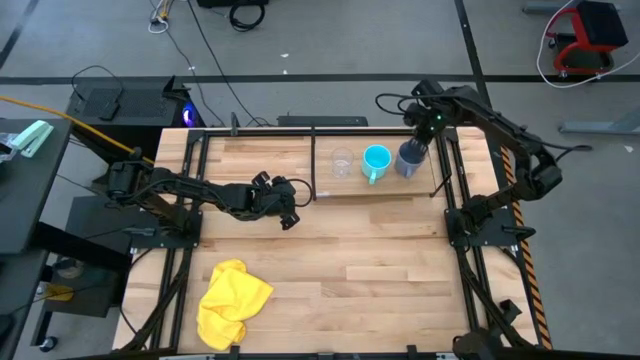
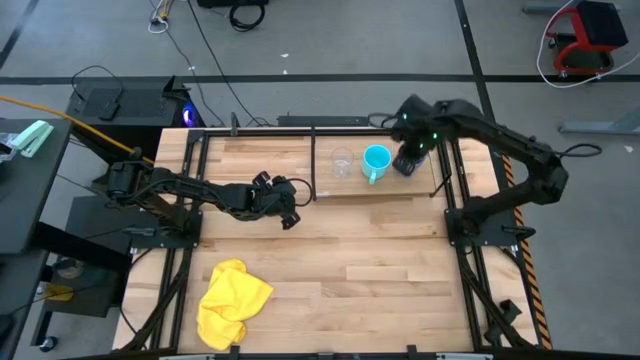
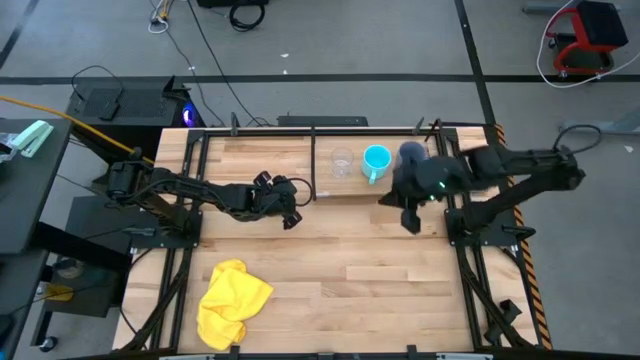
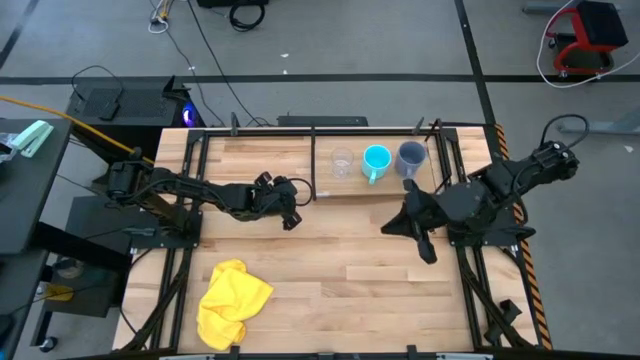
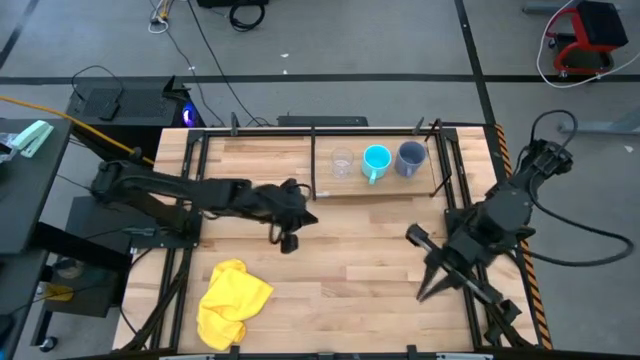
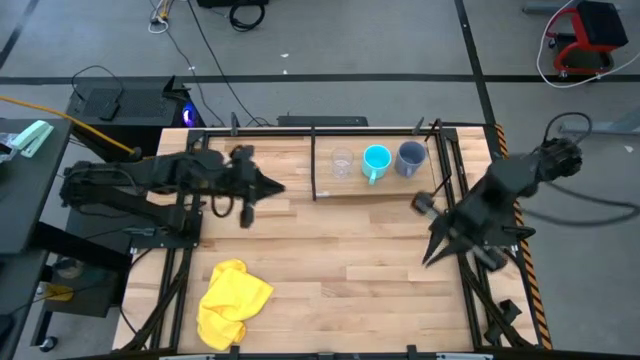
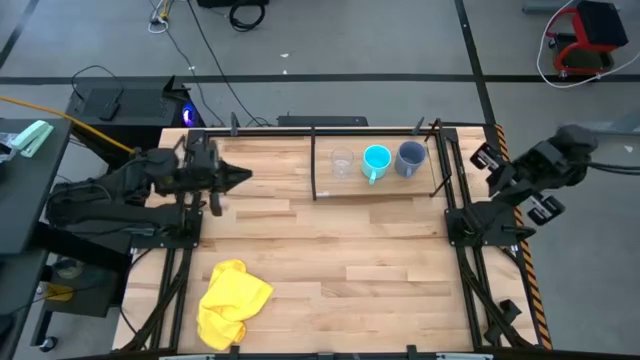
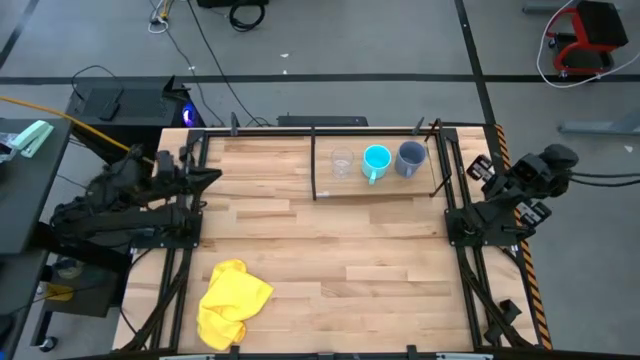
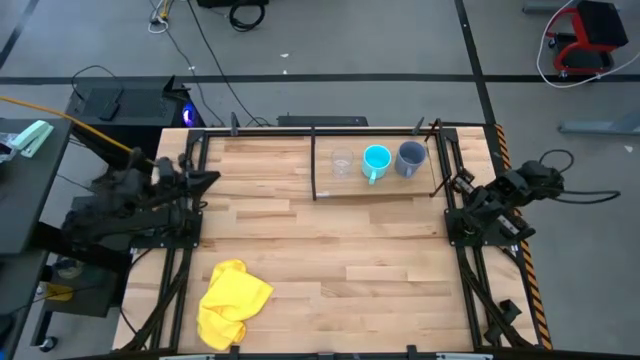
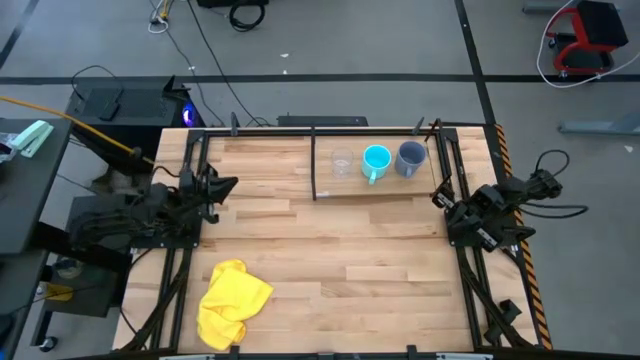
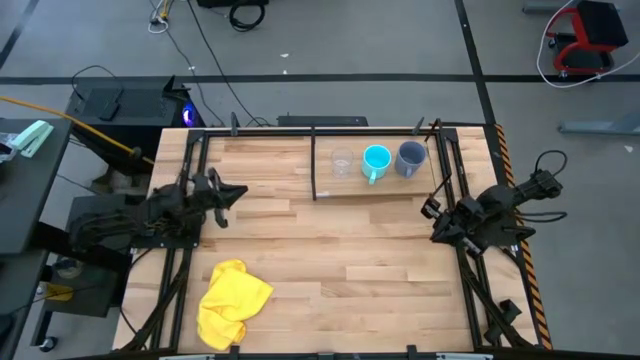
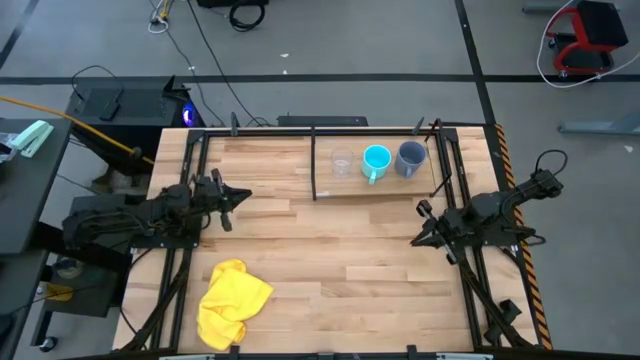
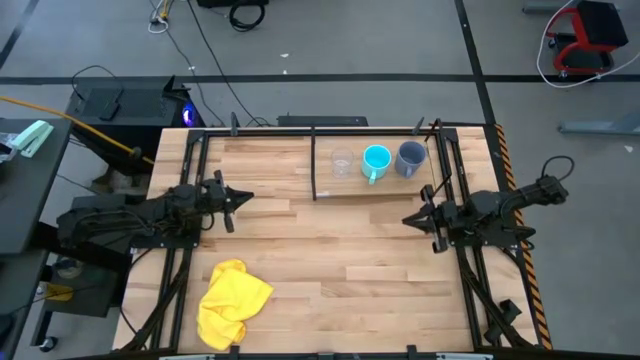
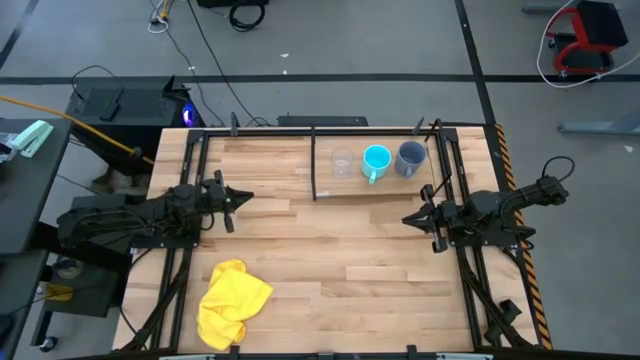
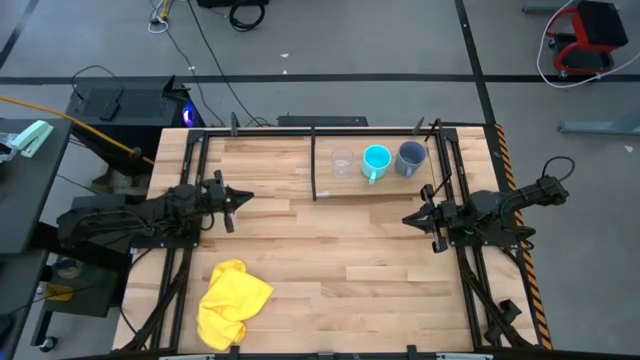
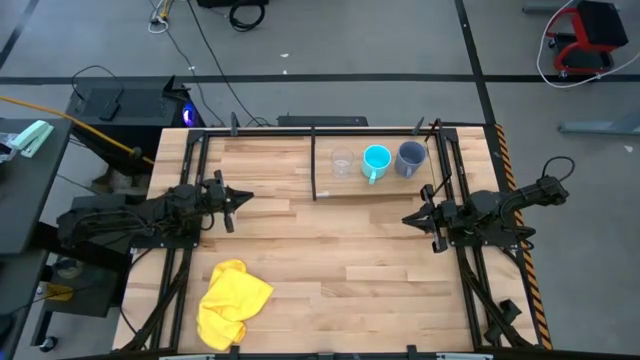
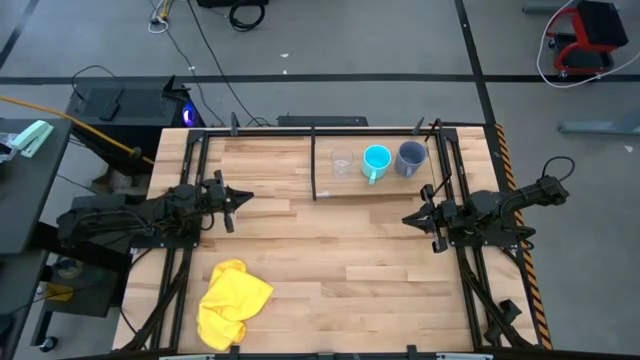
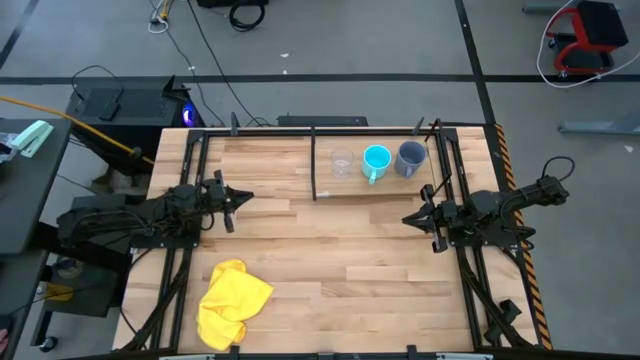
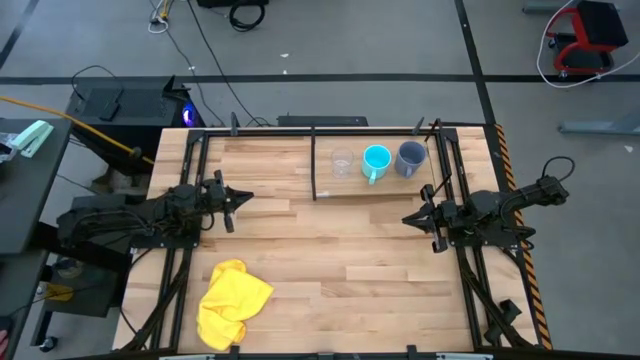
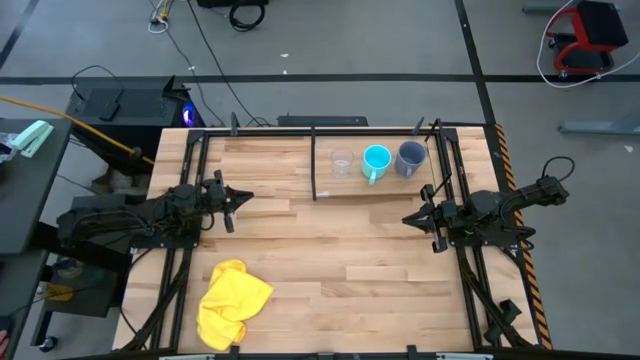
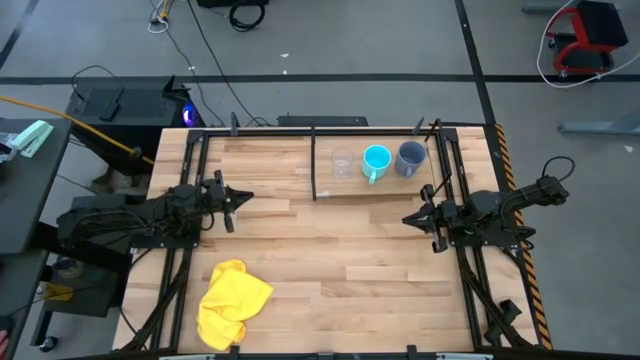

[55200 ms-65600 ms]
Task: Stack small to large cups/mugs on shelf
Return to Home Position

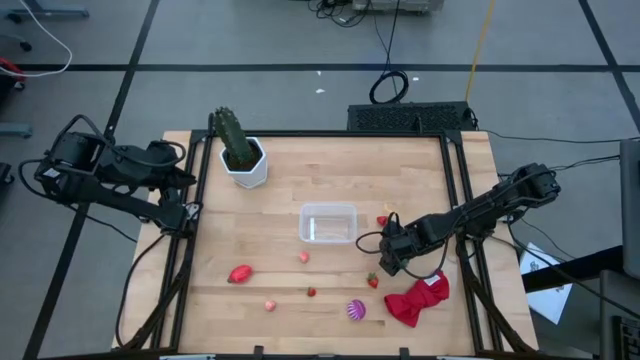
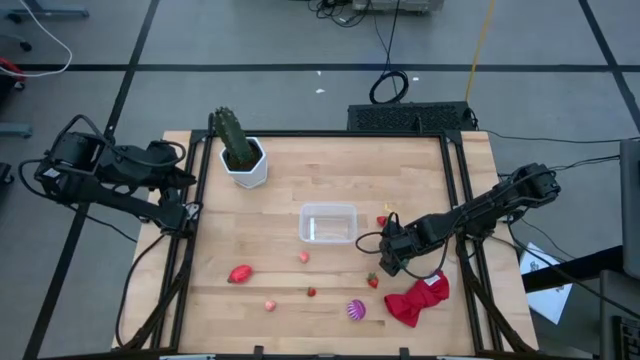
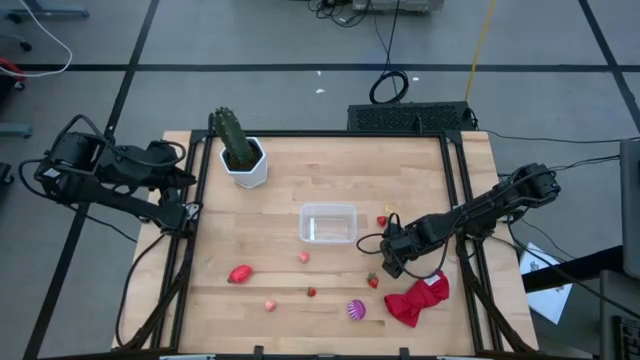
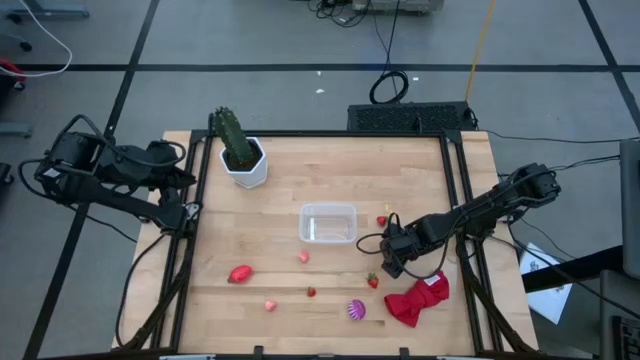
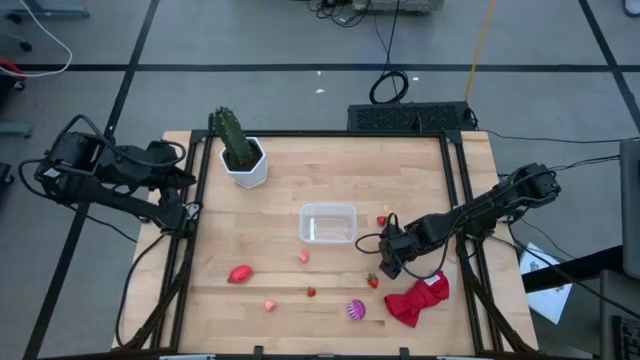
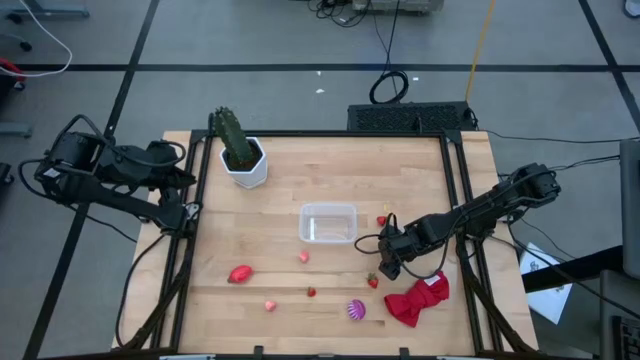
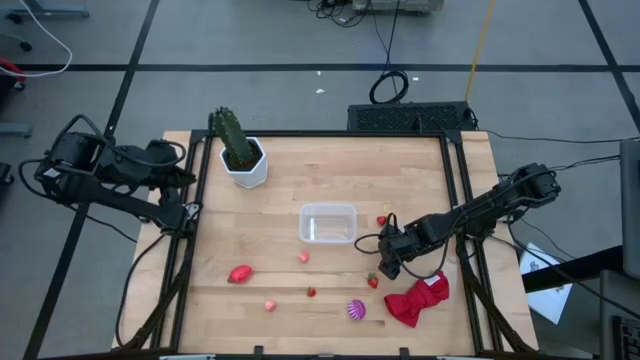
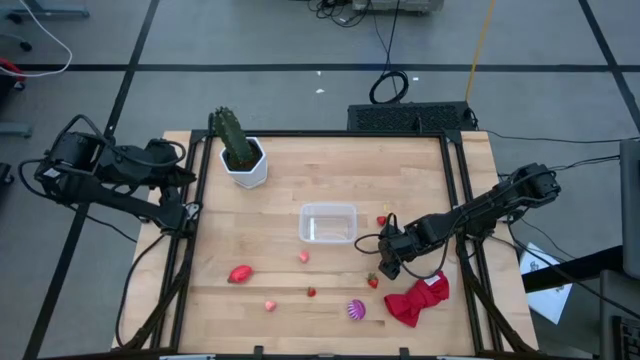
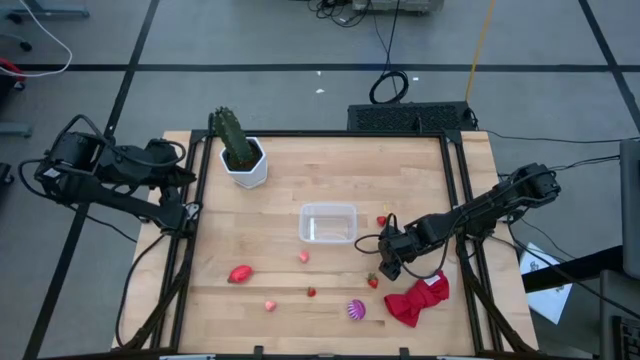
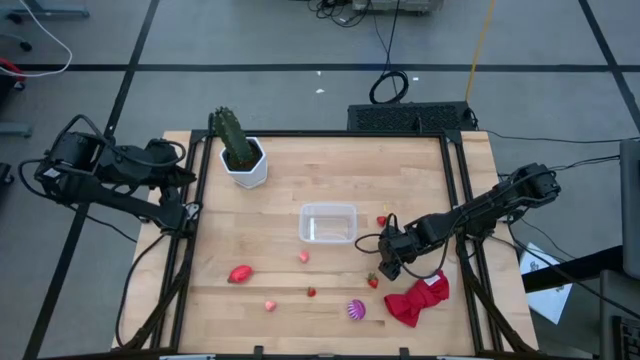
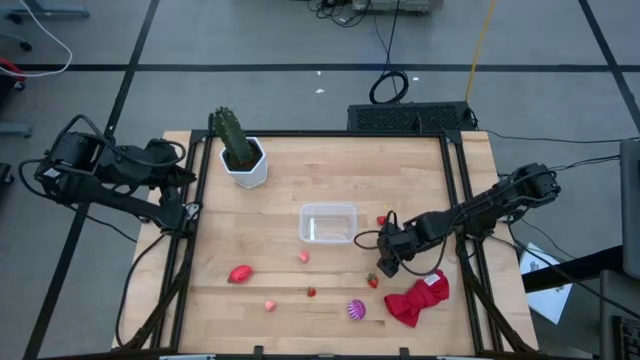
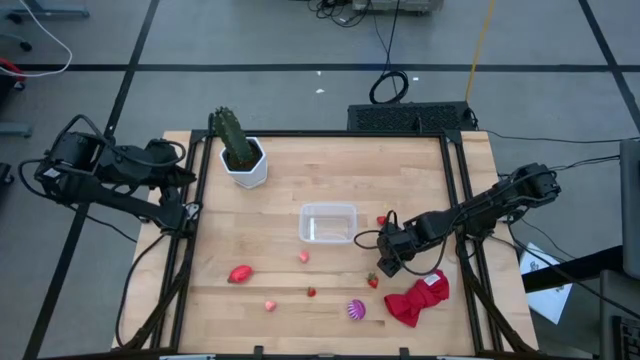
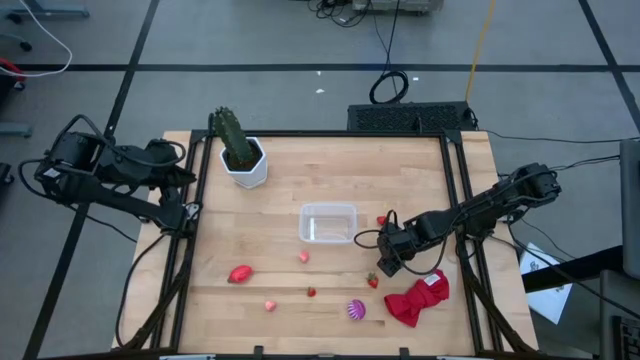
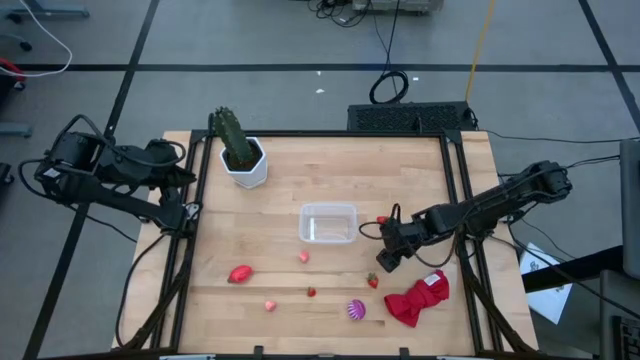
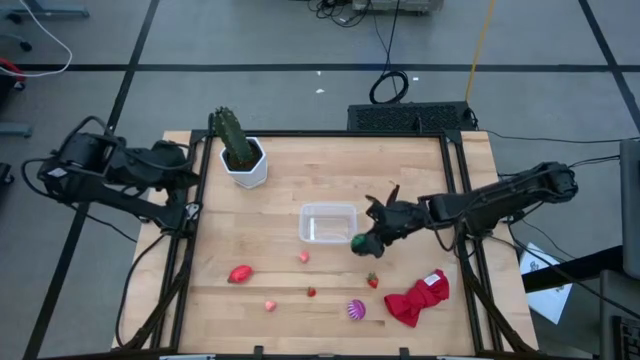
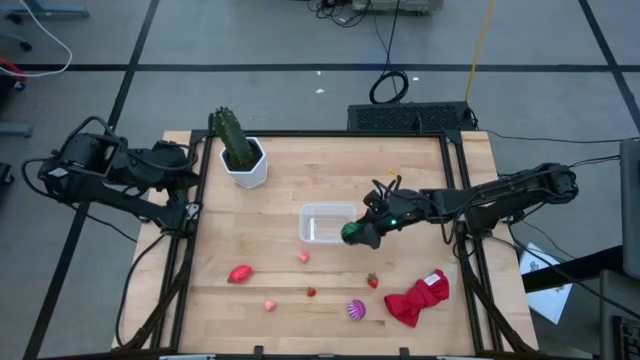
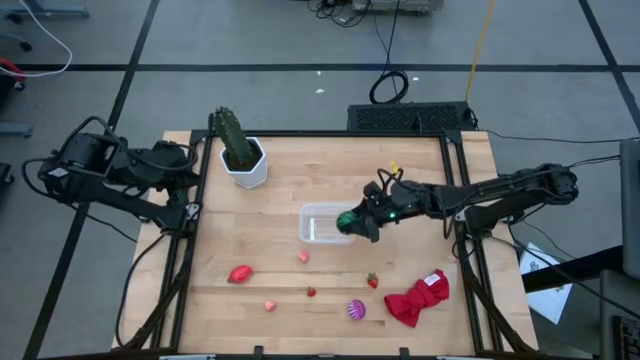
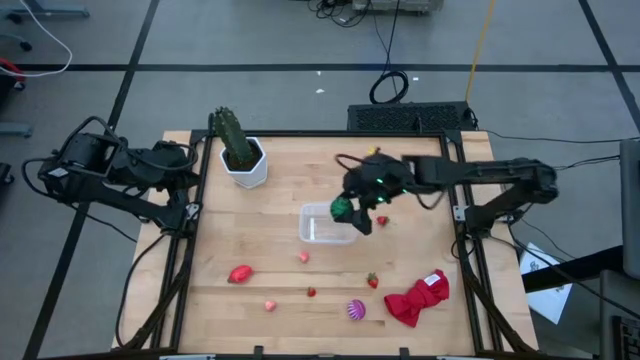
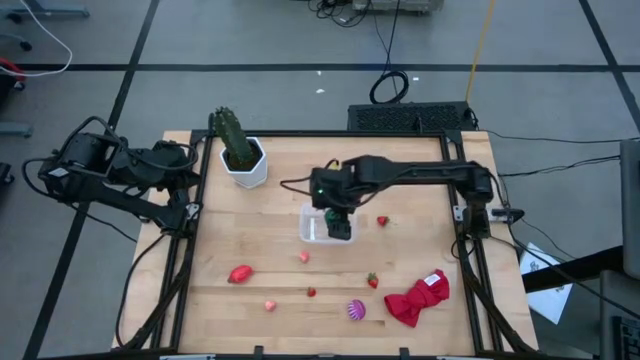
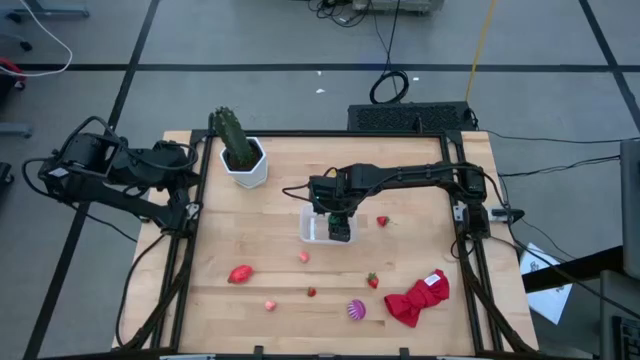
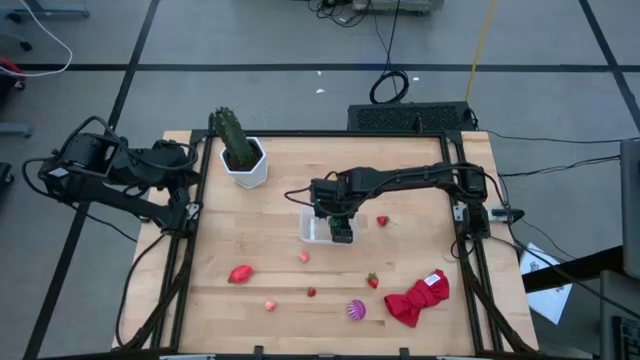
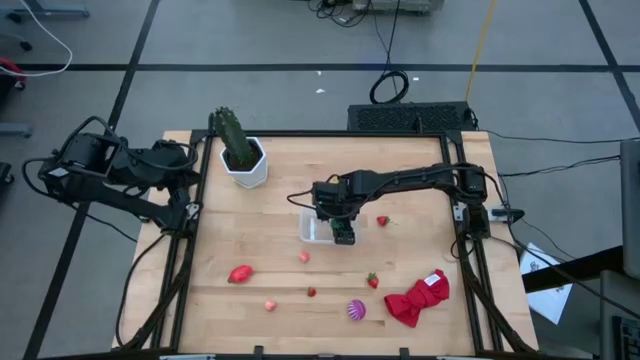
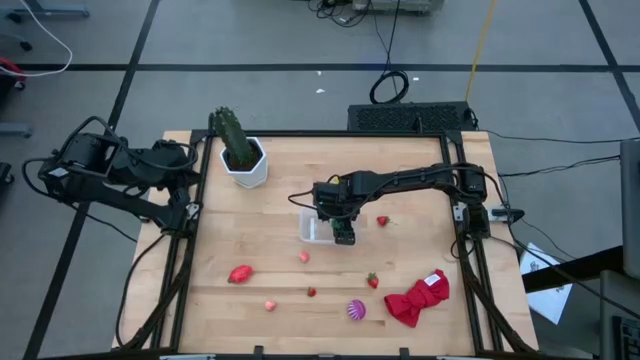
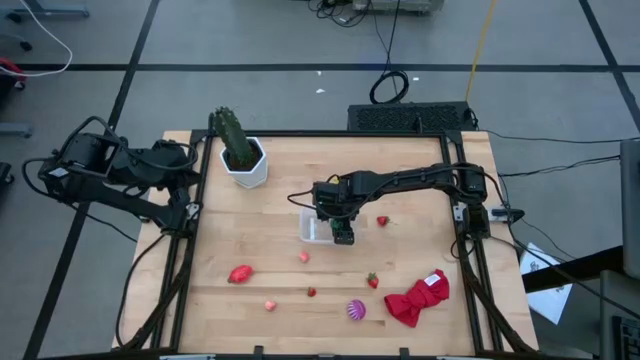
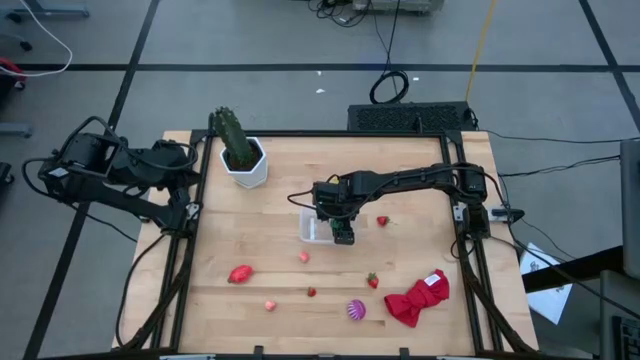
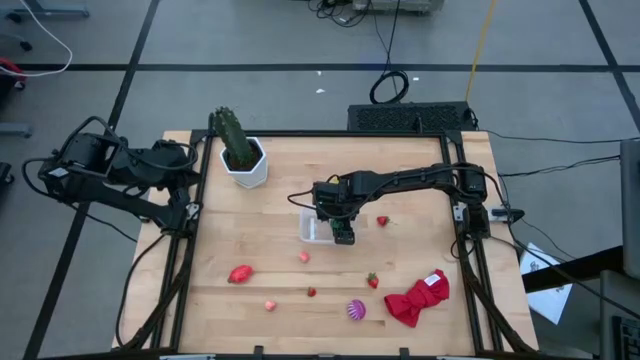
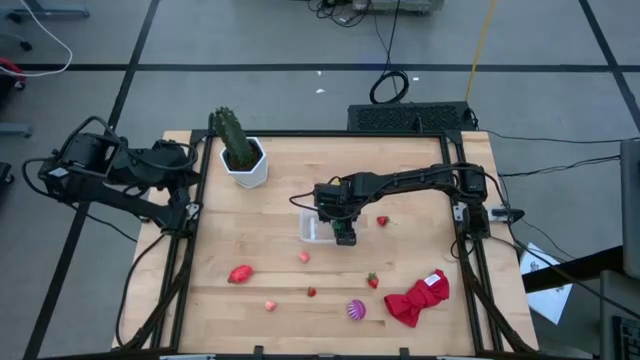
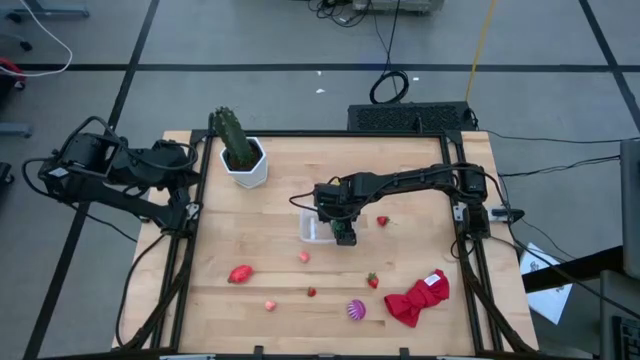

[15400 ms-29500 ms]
Task: Pick and placing Produce into tupperware
Put the watermelon into the transparent bin
